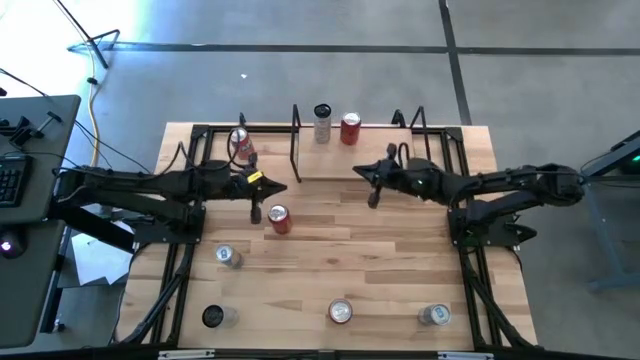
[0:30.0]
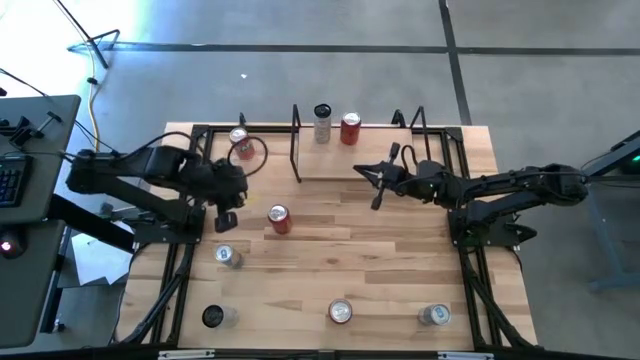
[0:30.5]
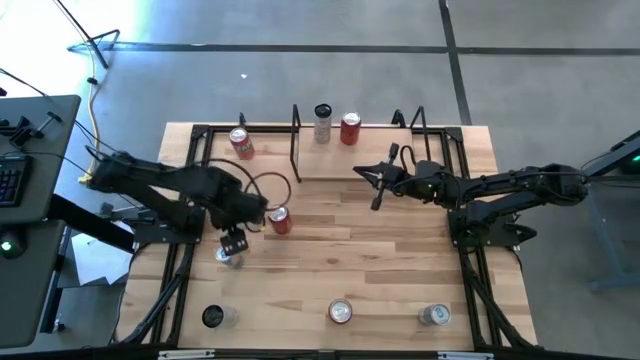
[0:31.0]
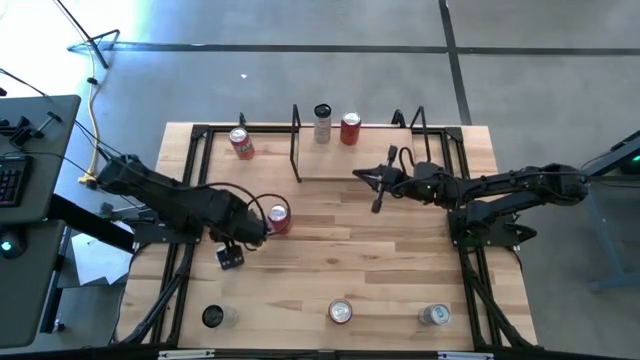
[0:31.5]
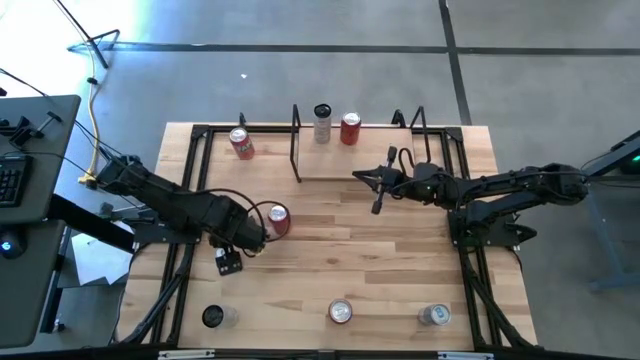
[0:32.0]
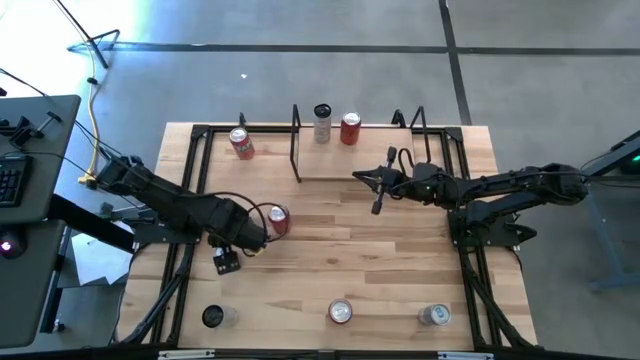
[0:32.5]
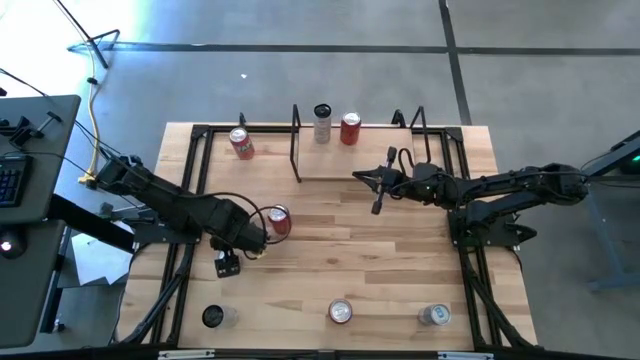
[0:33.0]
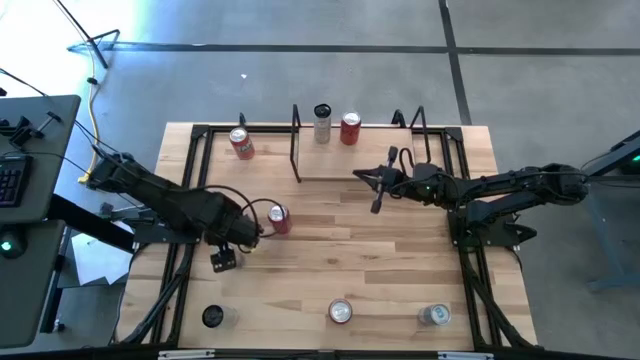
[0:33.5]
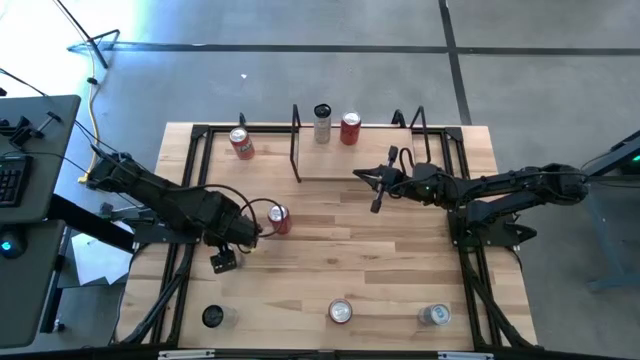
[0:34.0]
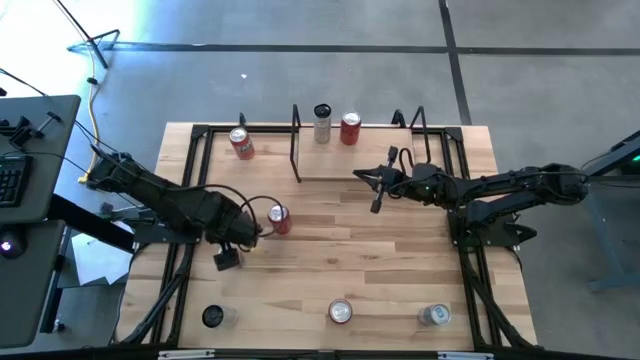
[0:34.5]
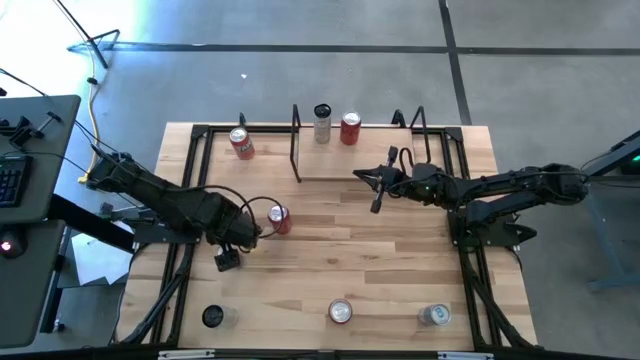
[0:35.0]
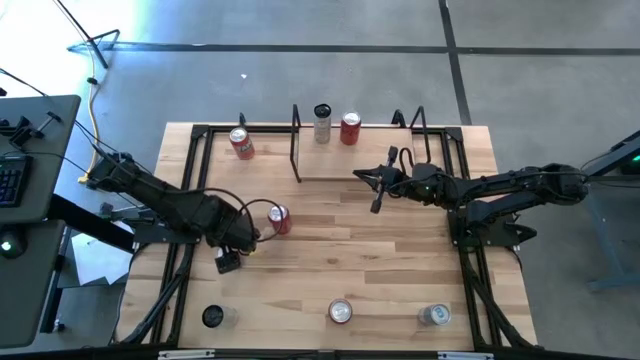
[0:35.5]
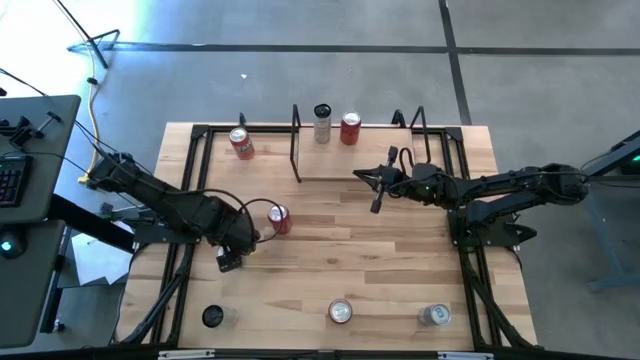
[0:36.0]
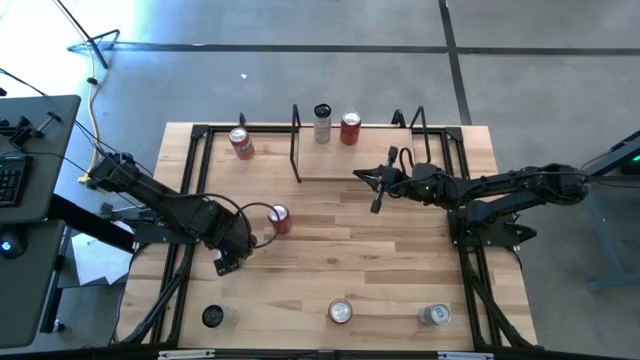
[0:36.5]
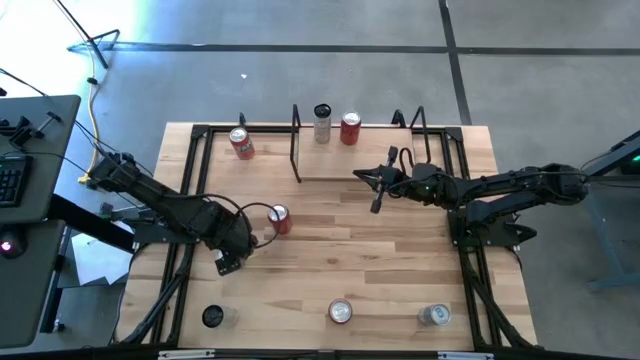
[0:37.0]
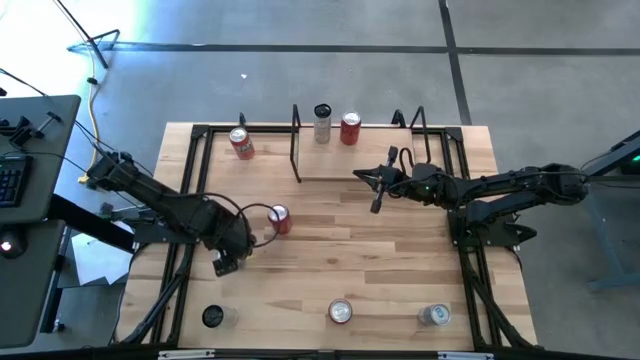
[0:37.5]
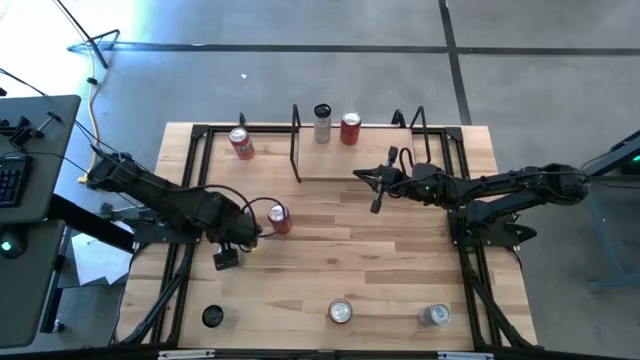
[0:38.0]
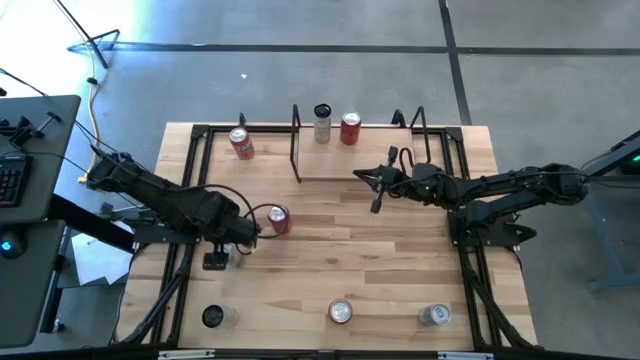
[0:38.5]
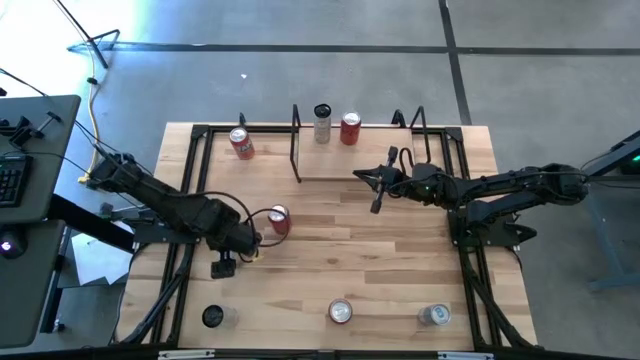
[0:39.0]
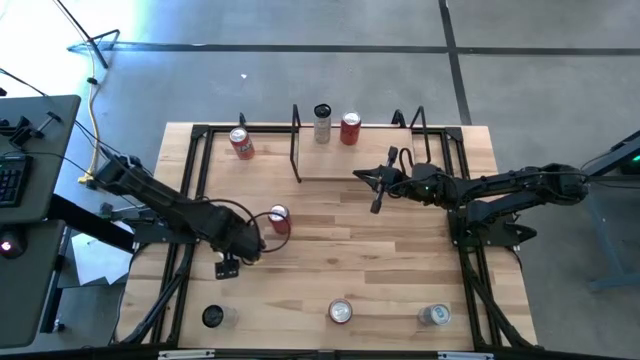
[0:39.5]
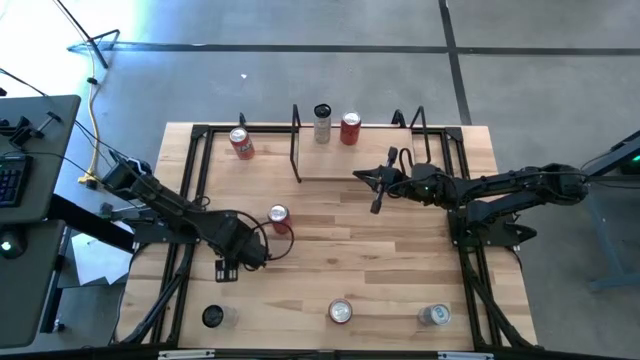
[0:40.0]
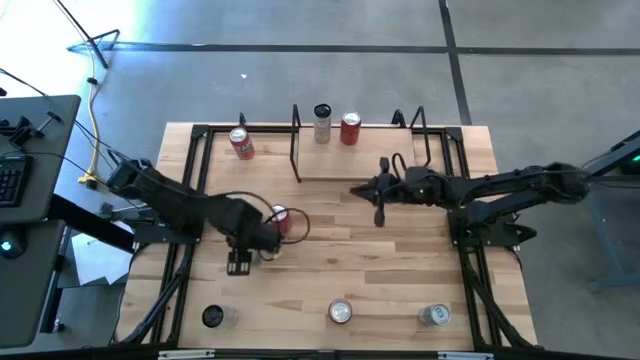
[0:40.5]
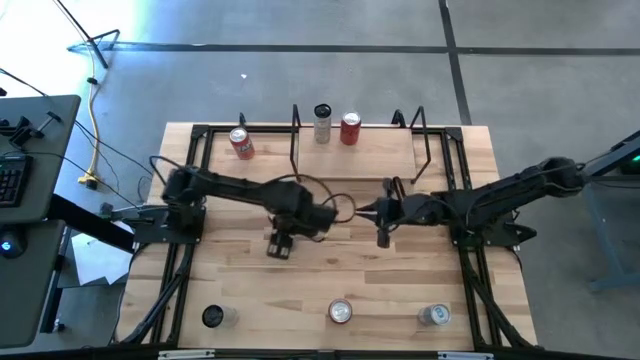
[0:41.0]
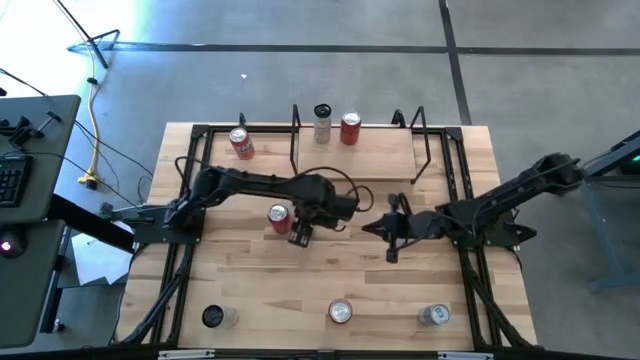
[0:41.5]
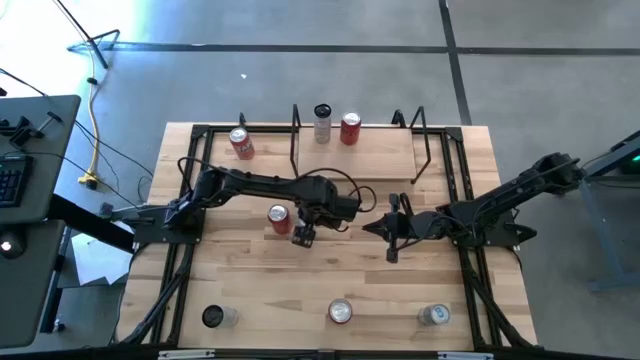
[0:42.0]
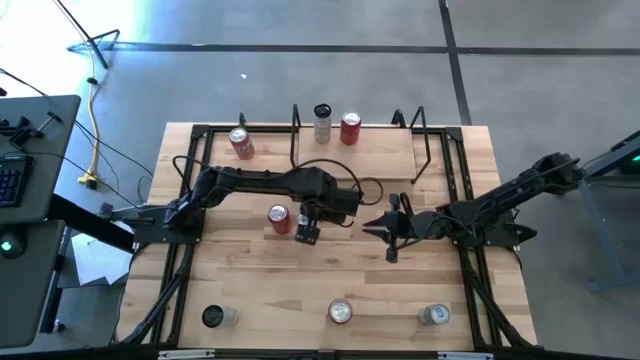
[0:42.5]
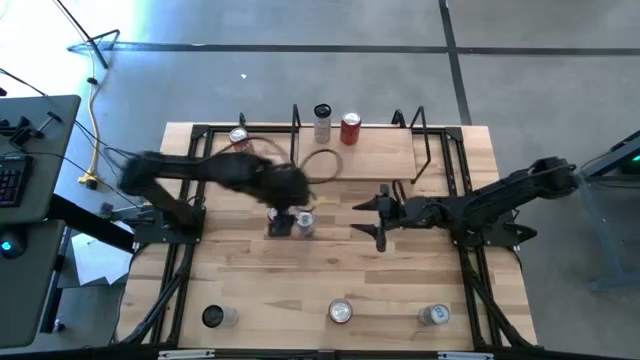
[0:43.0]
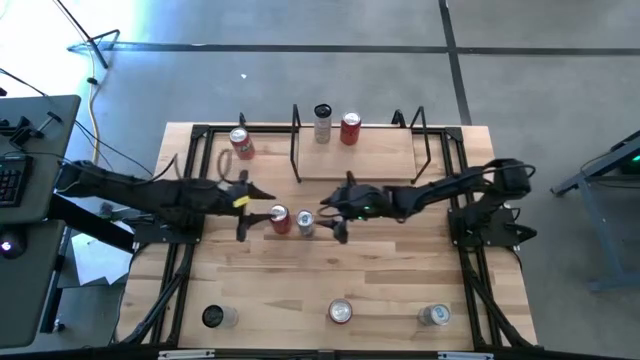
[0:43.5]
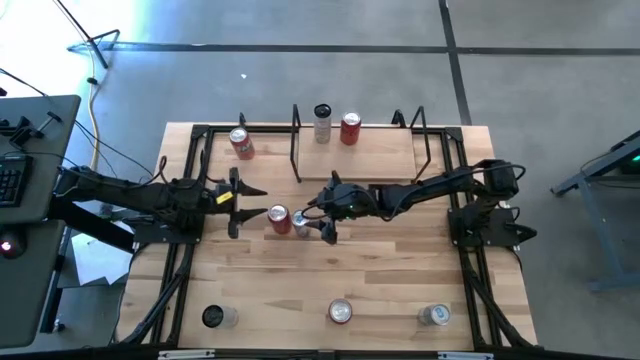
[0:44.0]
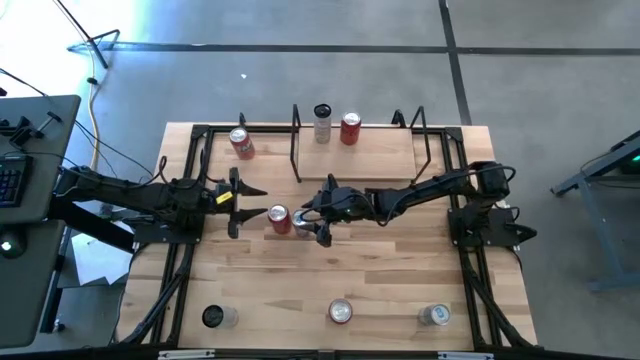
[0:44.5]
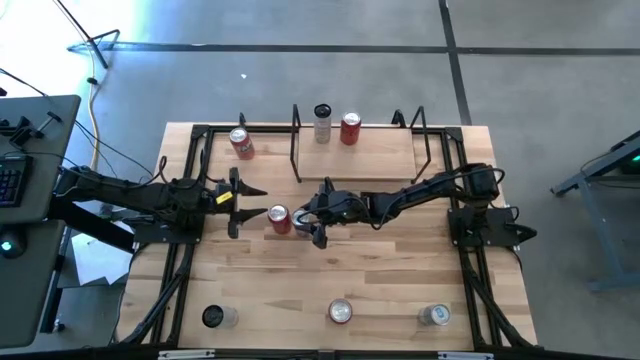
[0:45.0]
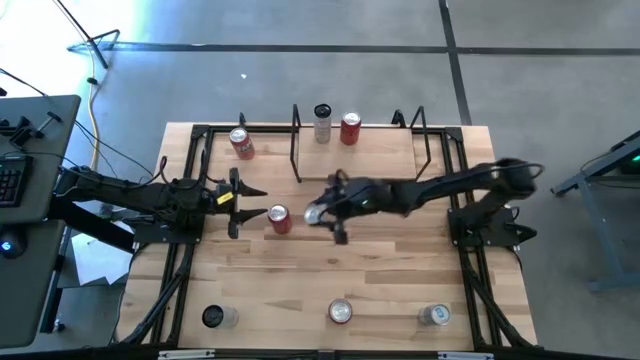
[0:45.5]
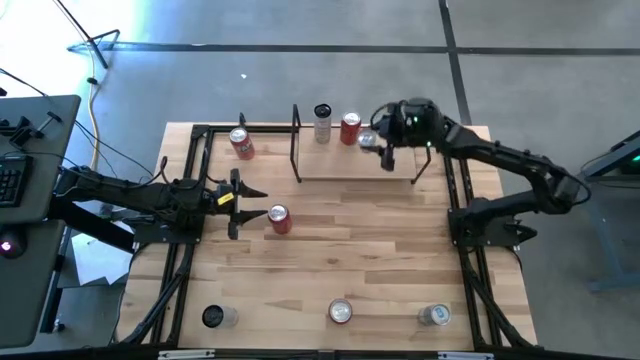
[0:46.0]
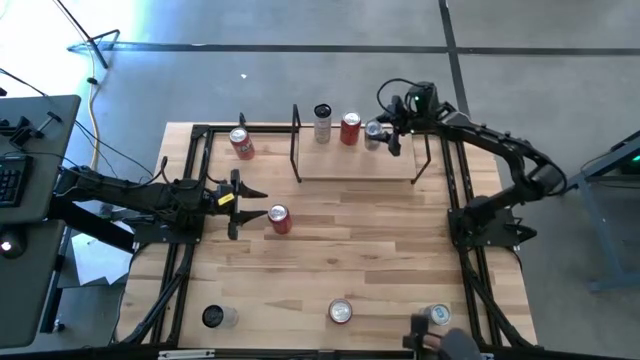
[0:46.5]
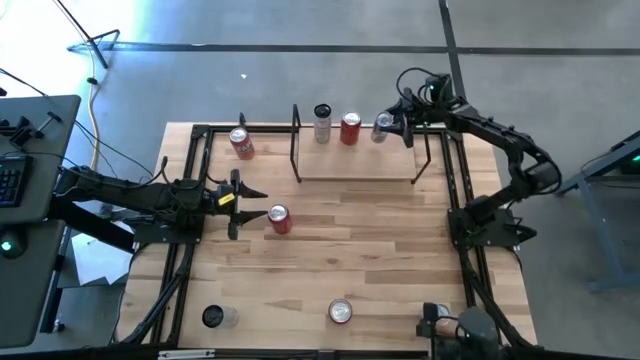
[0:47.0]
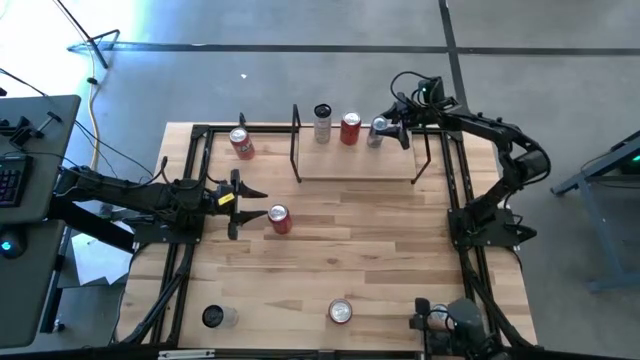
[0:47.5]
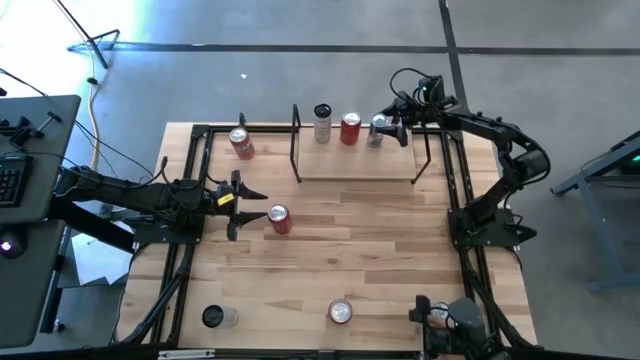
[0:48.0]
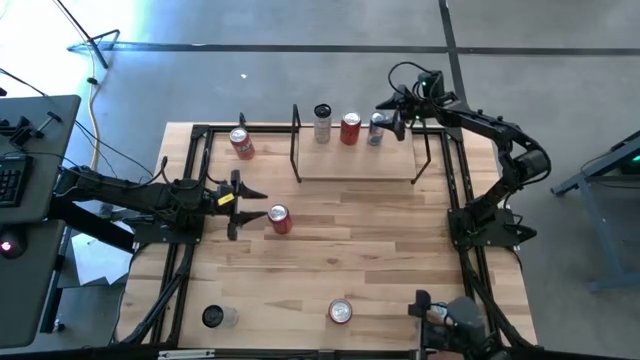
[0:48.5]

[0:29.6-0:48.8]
Task: Place canned beverage on shelf
Put the top blue soda can on the shelf

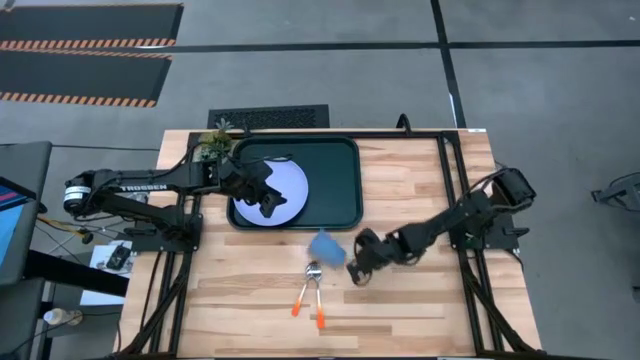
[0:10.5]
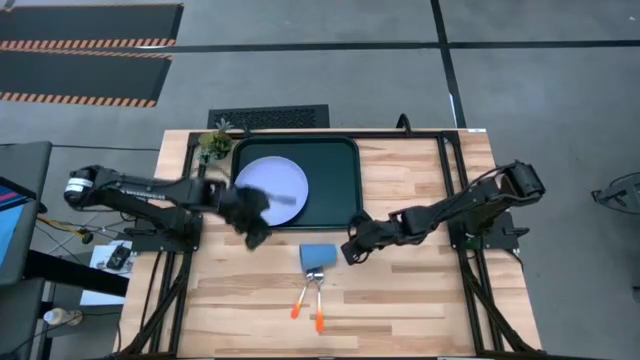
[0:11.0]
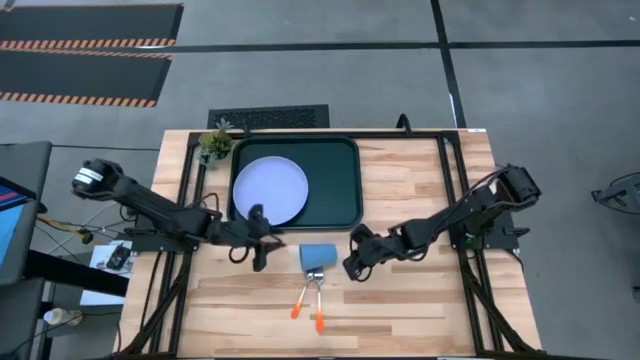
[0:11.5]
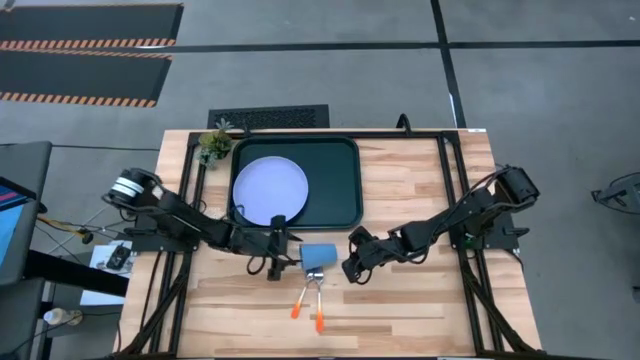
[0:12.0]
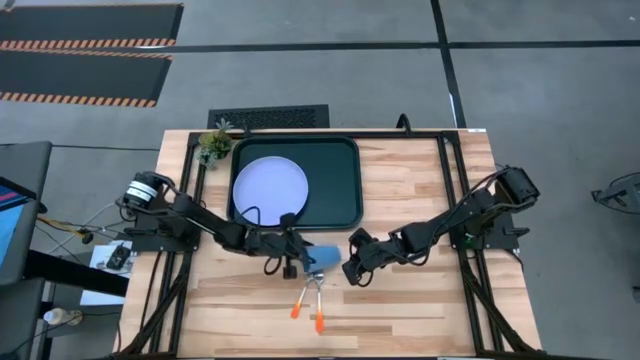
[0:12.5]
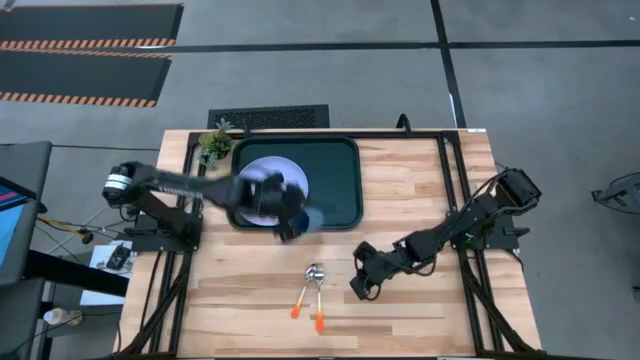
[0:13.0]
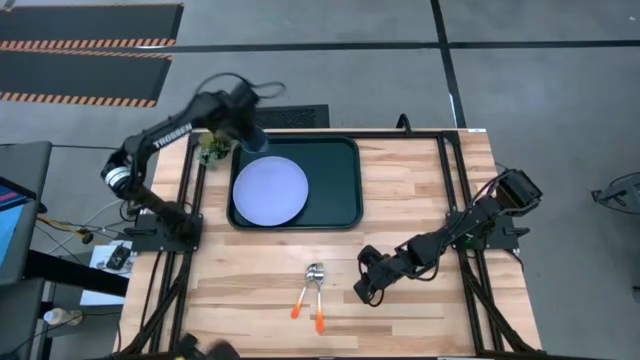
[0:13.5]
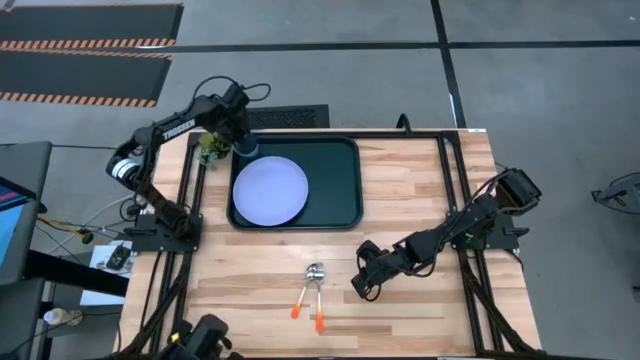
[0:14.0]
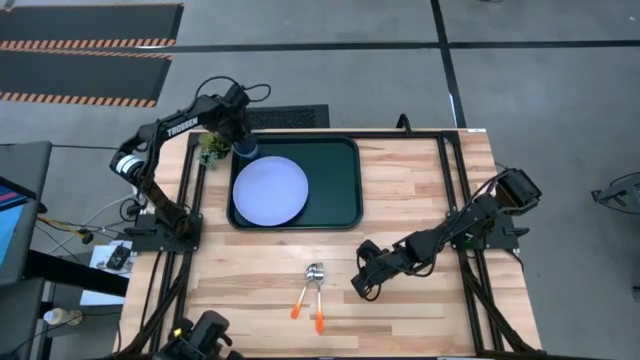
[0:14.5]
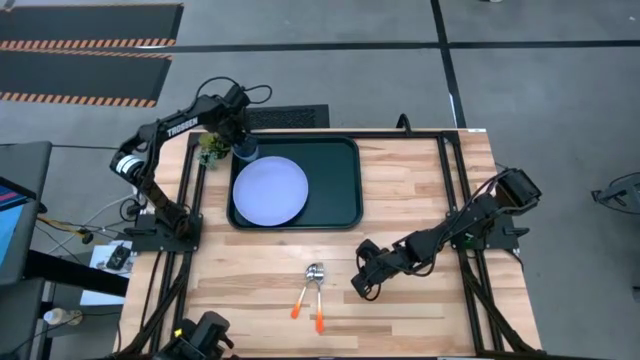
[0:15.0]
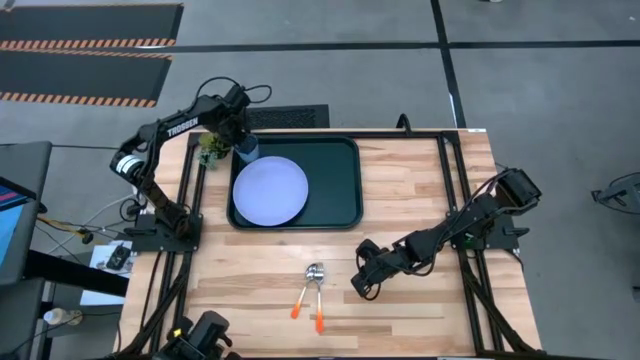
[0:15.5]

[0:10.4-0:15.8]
Task: Pick and place plate/cup/fork/spoon on tray
Place the blue cup on the light blue plate on the dark green tray
